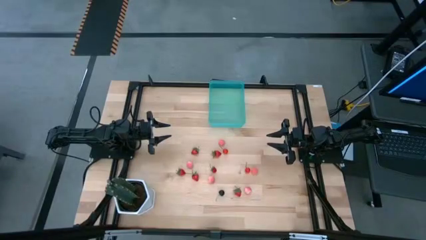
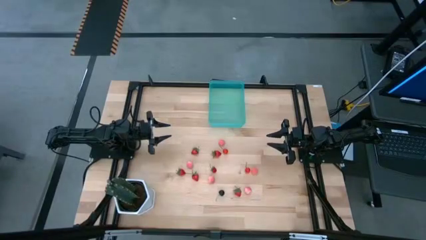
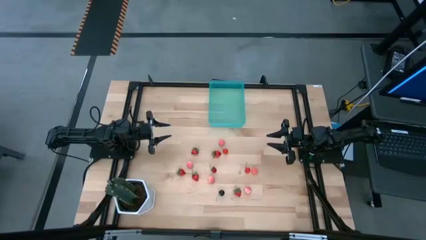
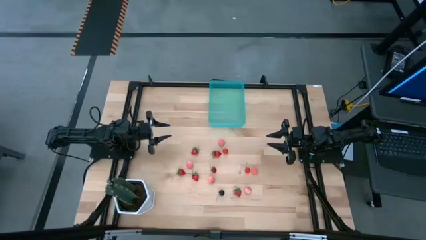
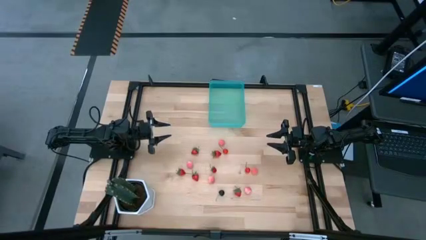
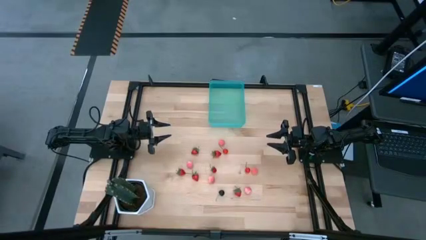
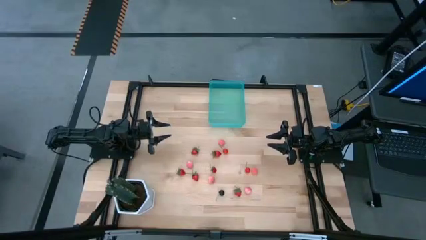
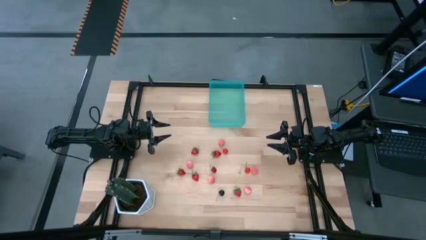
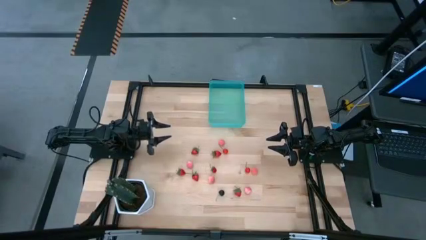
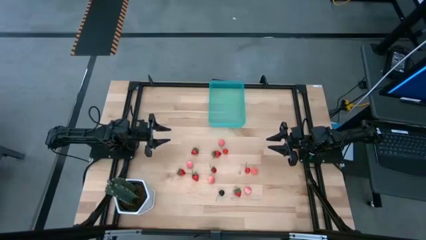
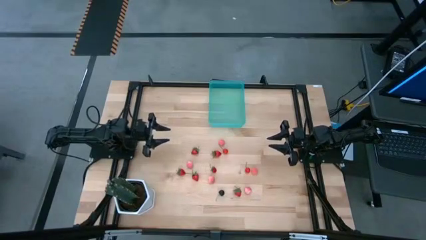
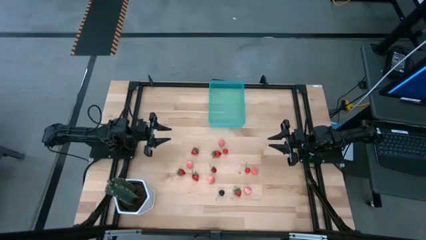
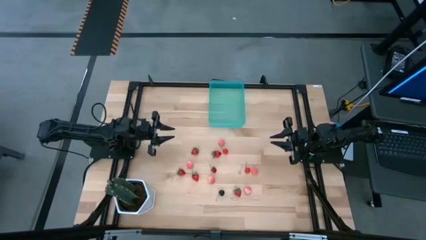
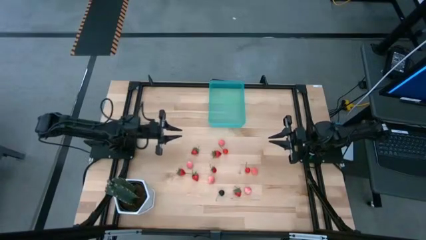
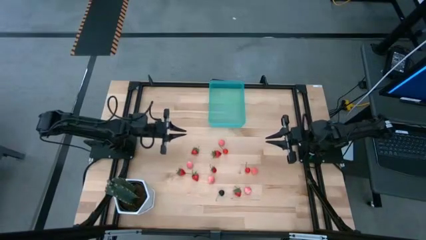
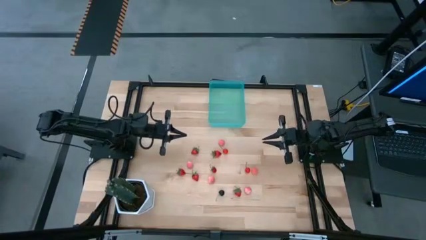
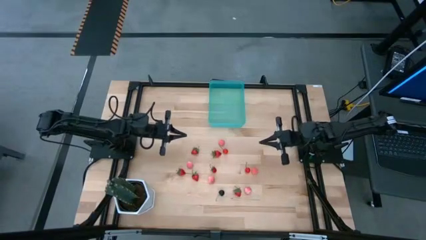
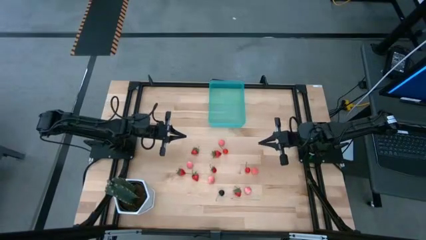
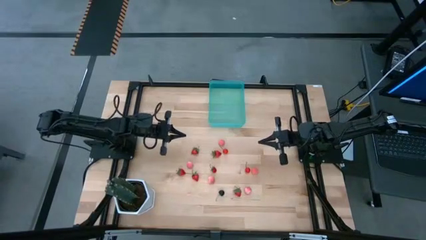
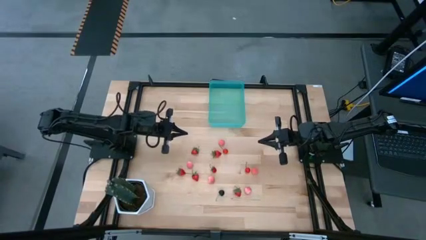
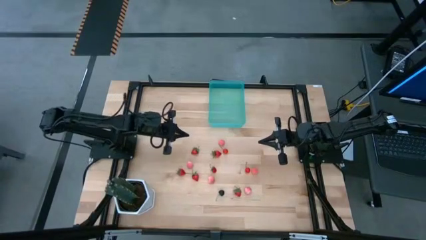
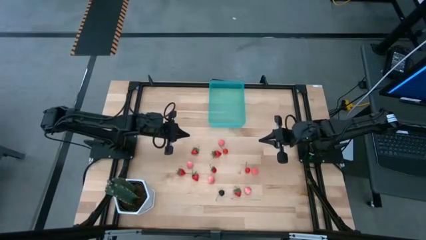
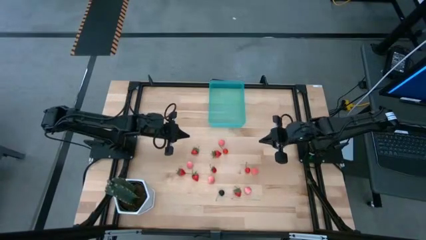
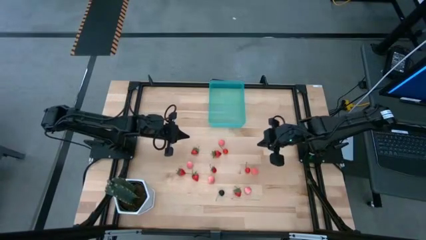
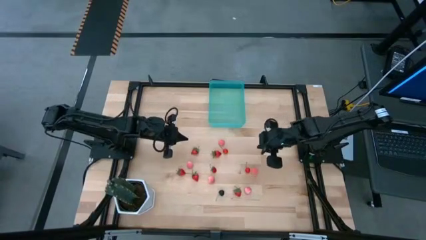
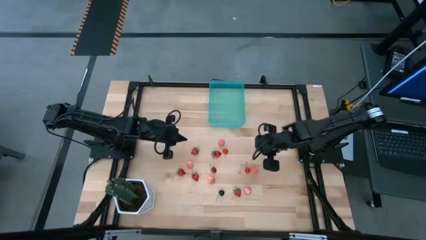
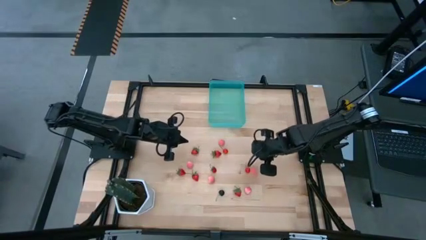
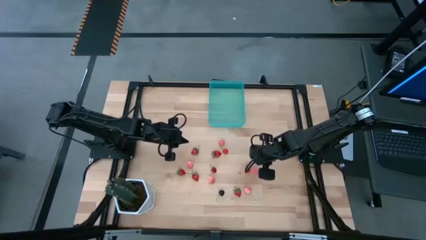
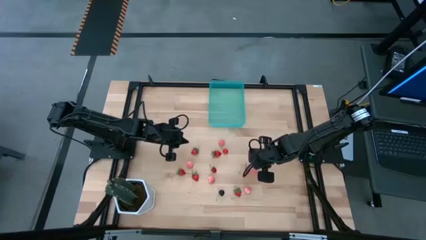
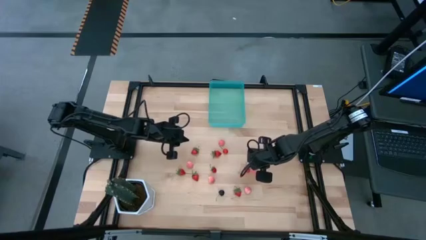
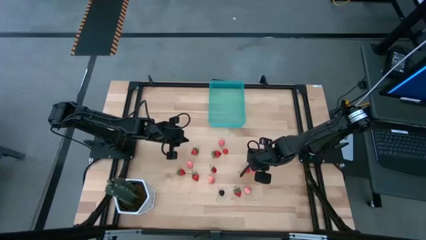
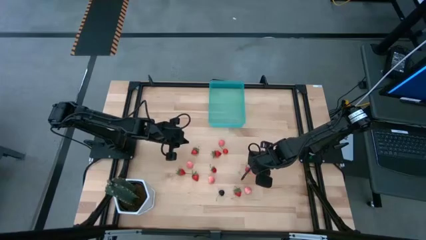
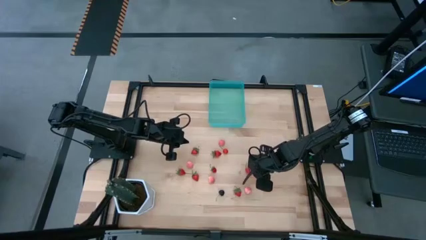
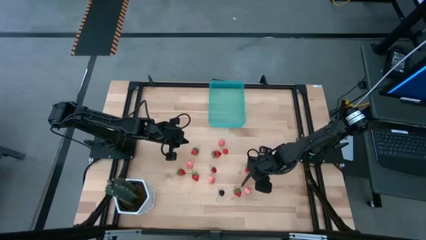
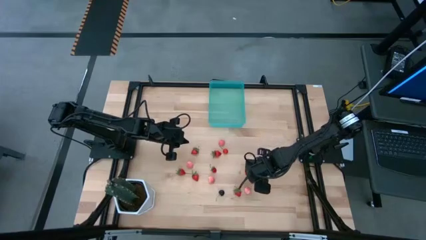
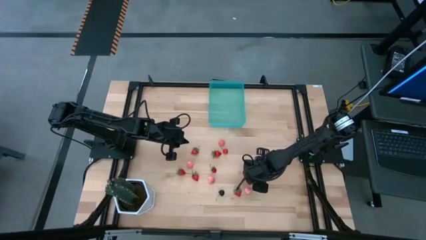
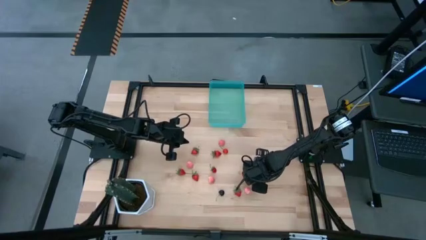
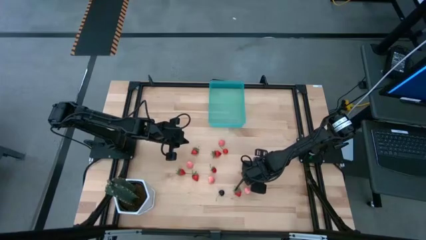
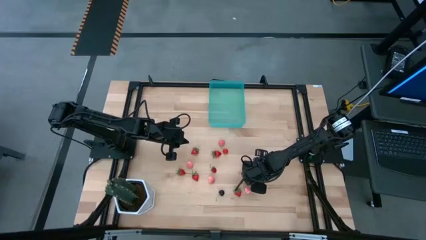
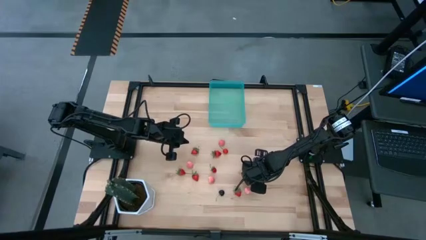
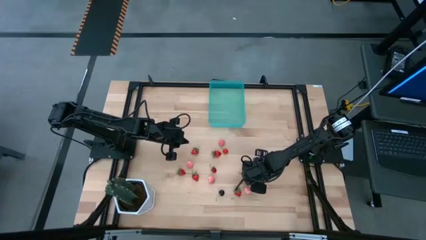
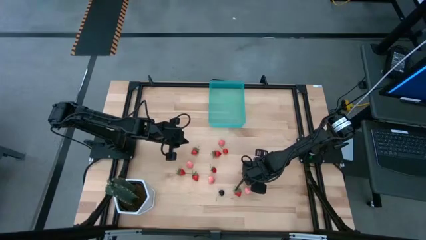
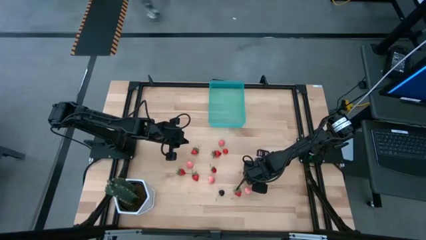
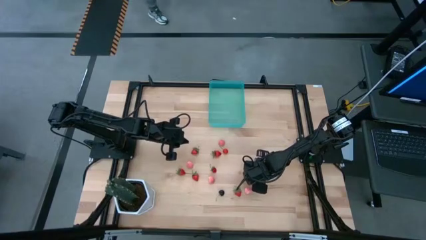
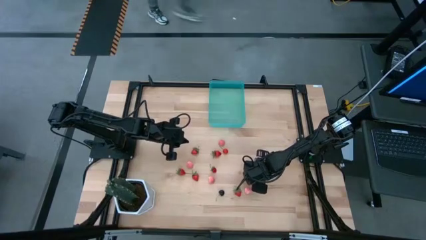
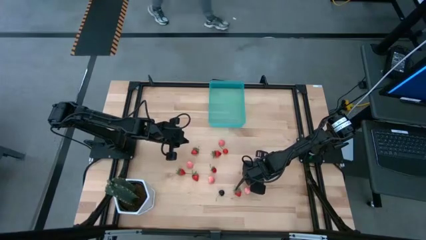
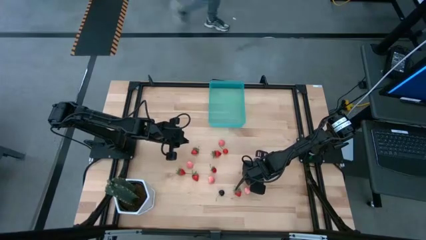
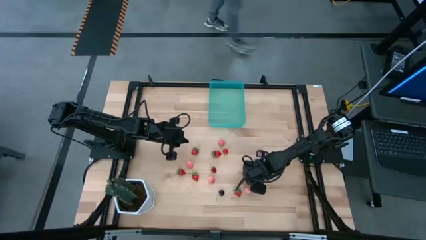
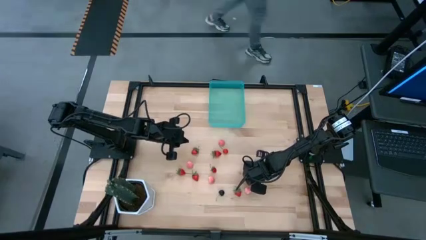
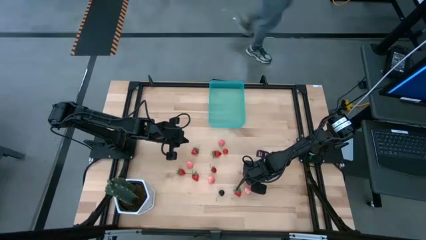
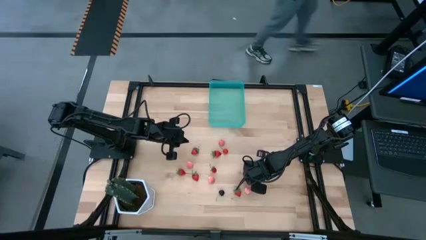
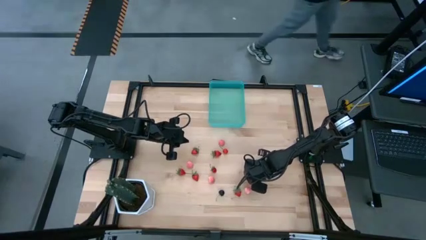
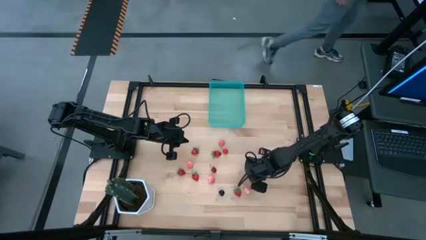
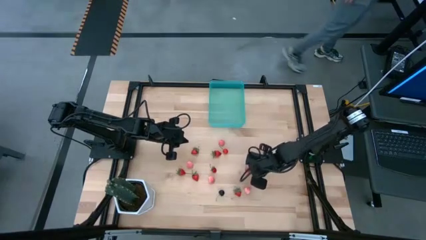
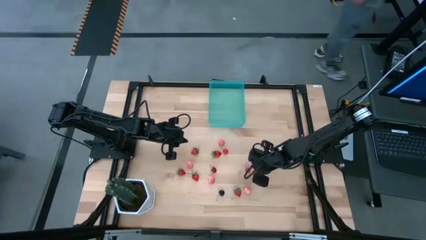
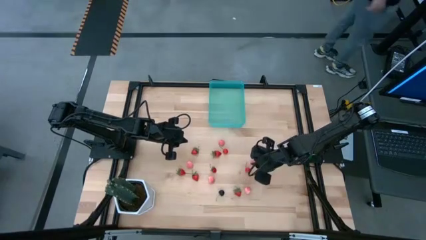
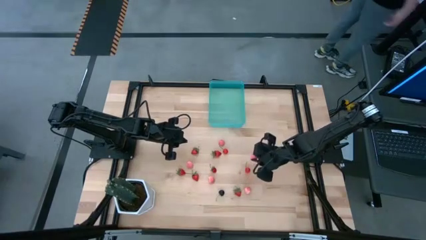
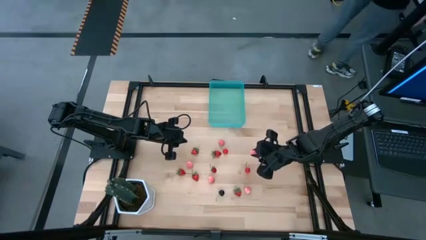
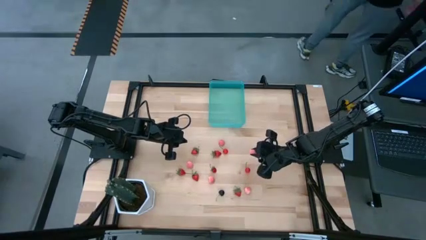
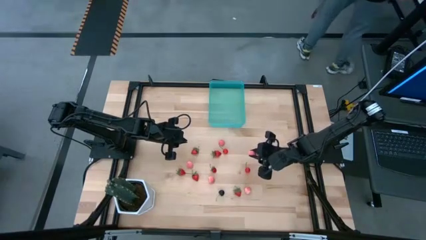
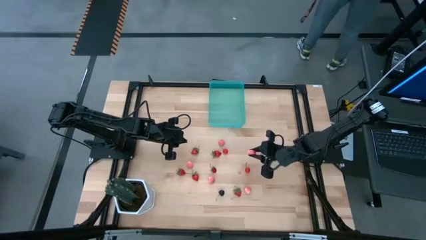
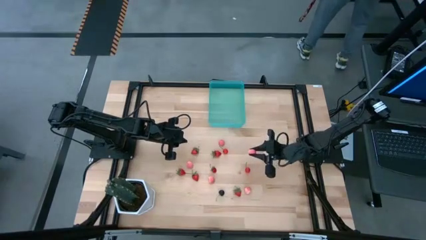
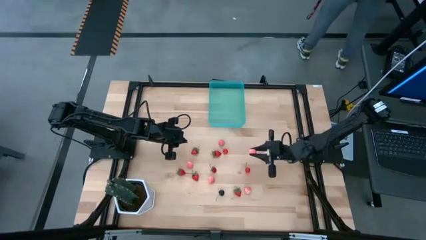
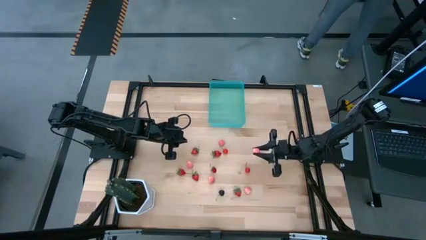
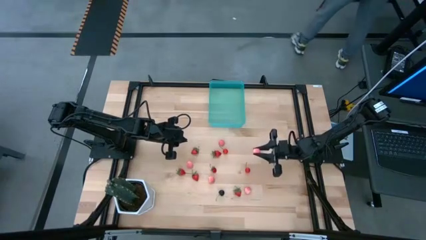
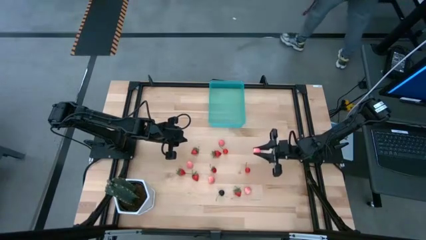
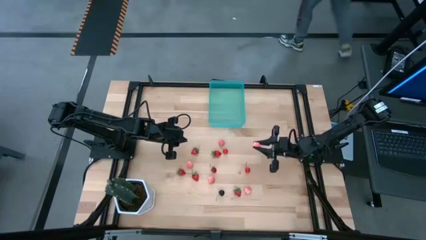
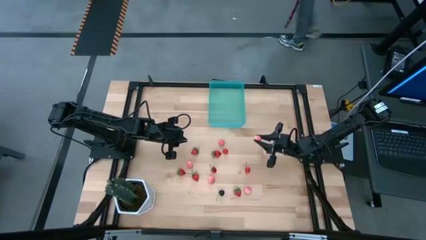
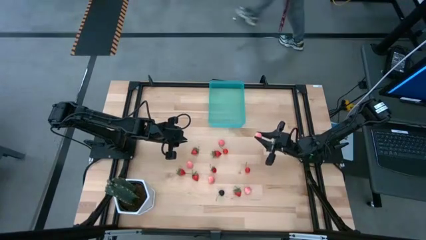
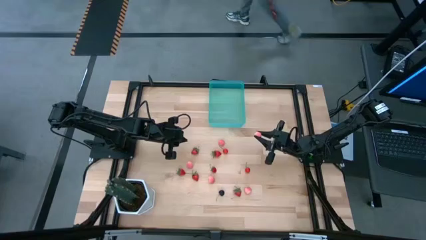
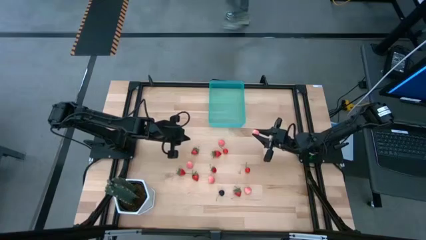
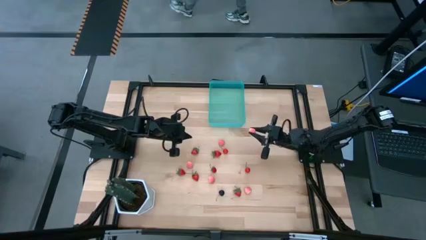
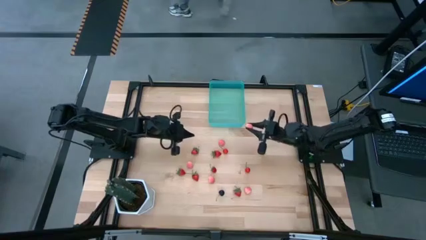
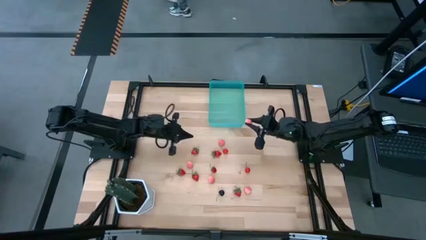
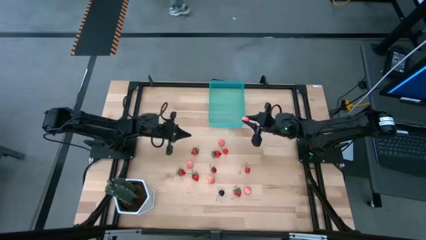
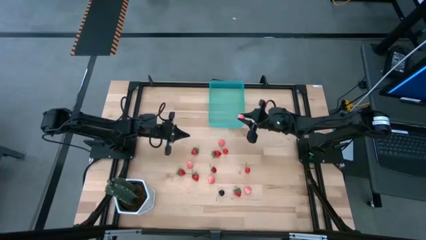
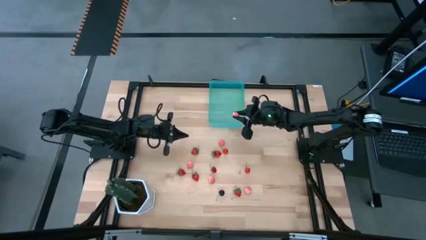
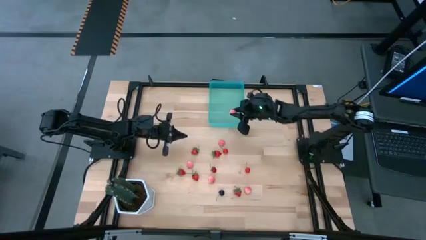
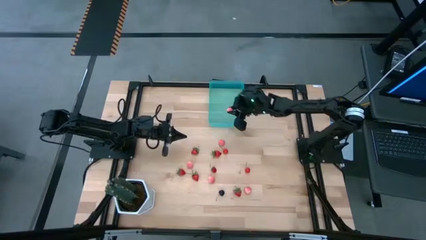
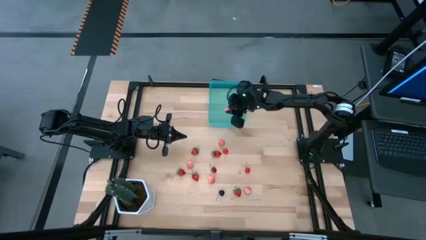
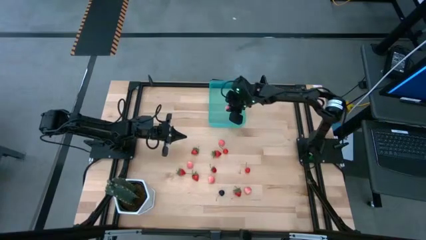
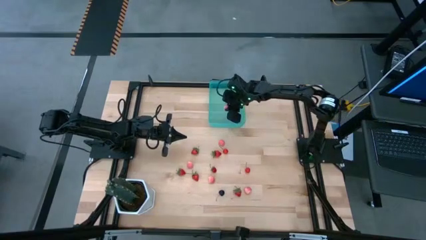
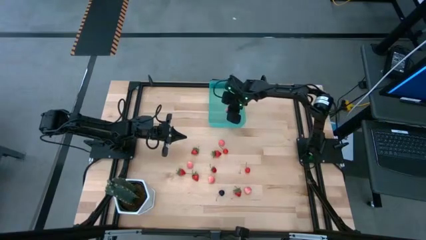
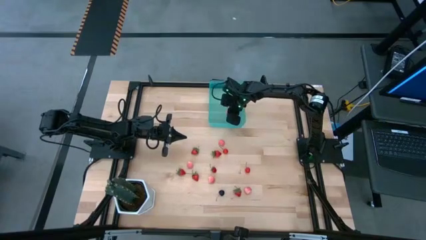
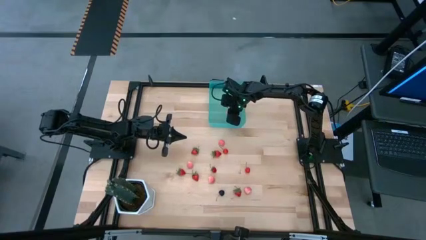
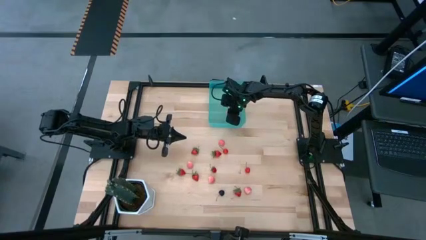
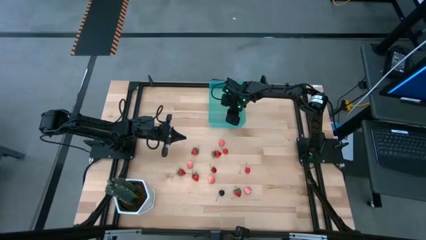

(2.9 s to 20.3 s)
Task: Pick and placing Produce into tupperware
Put the pink peach into the blue bin
